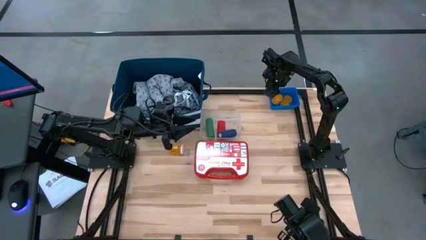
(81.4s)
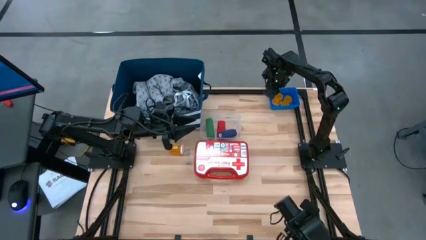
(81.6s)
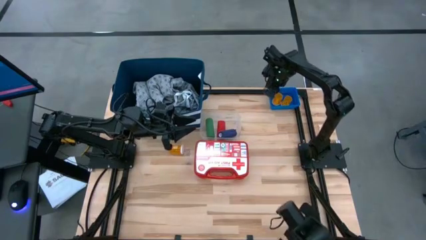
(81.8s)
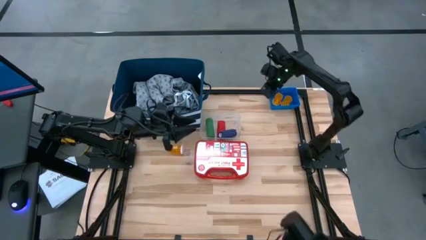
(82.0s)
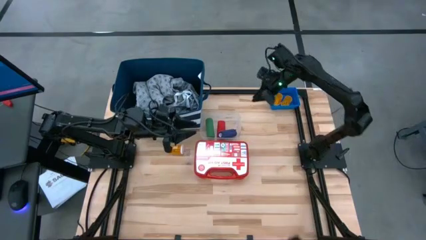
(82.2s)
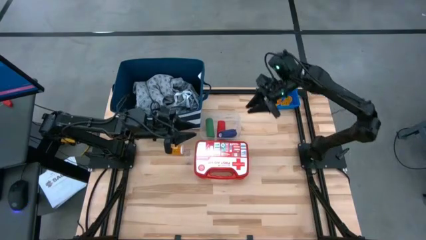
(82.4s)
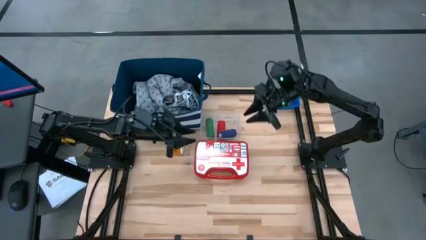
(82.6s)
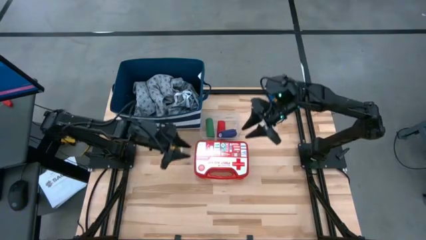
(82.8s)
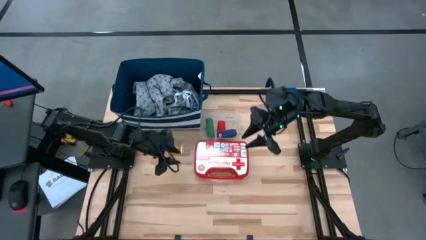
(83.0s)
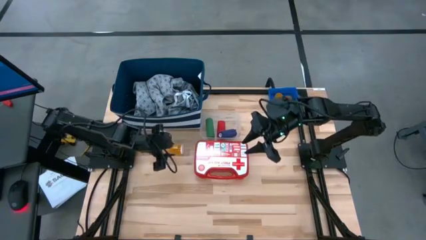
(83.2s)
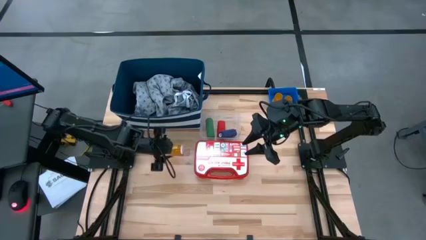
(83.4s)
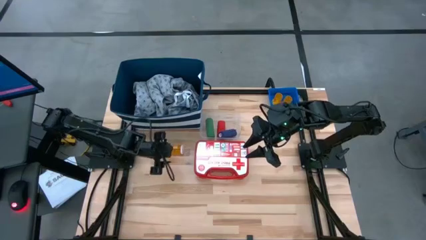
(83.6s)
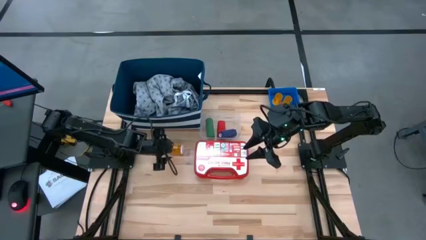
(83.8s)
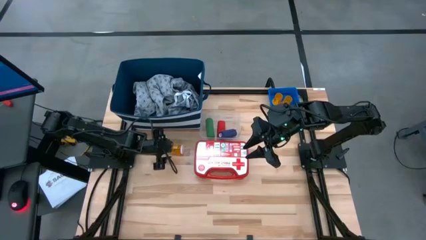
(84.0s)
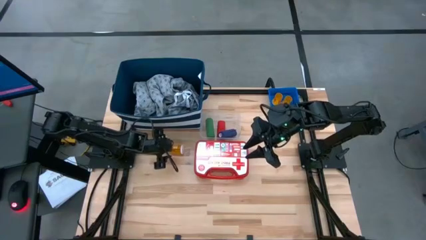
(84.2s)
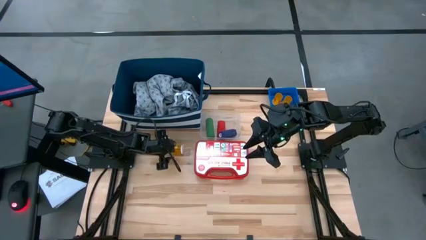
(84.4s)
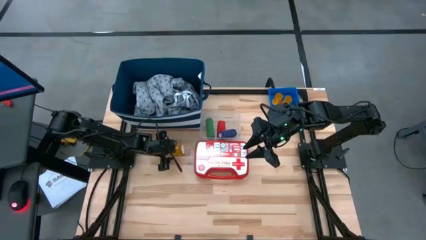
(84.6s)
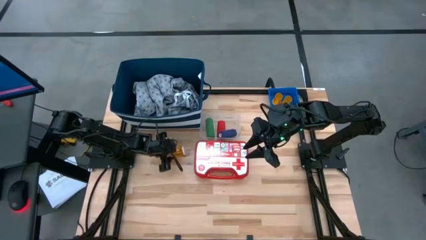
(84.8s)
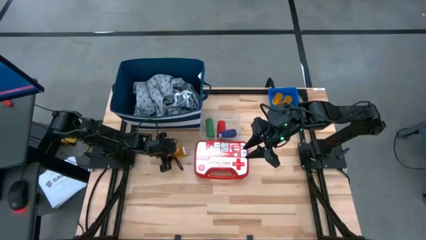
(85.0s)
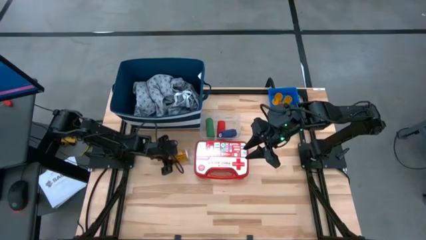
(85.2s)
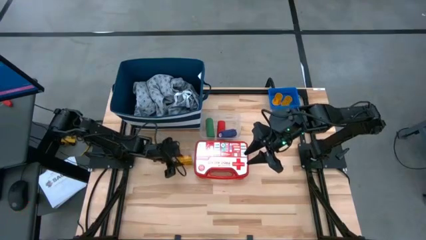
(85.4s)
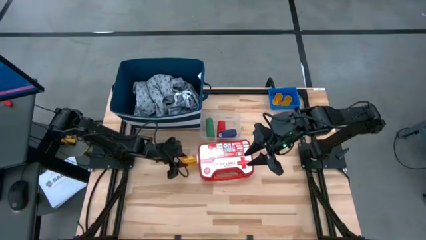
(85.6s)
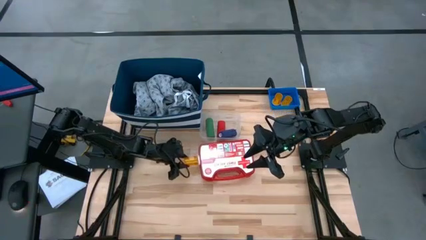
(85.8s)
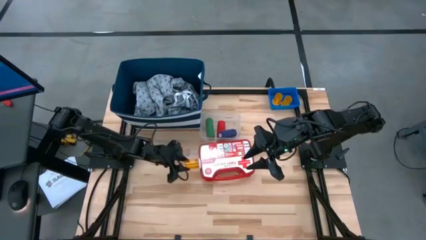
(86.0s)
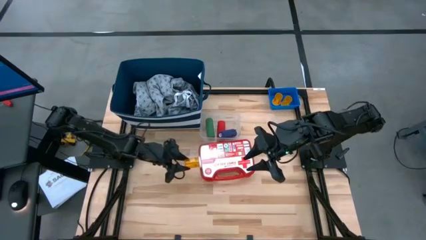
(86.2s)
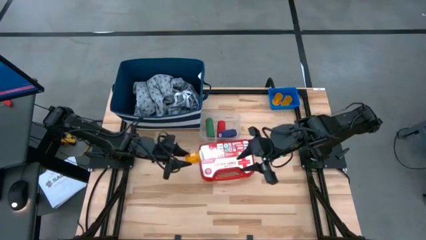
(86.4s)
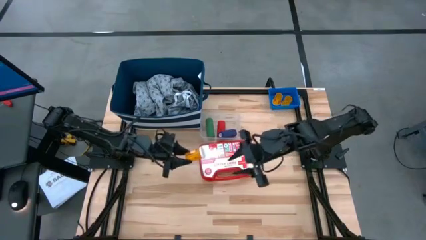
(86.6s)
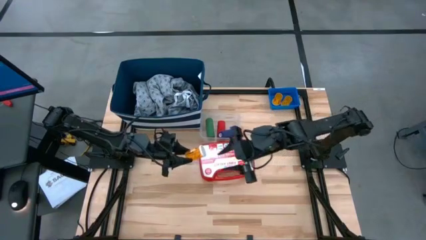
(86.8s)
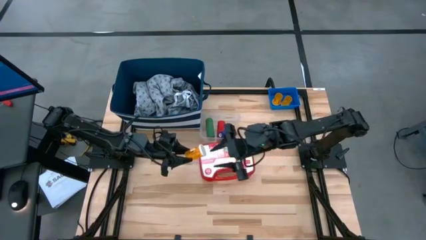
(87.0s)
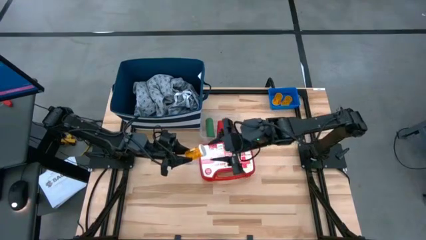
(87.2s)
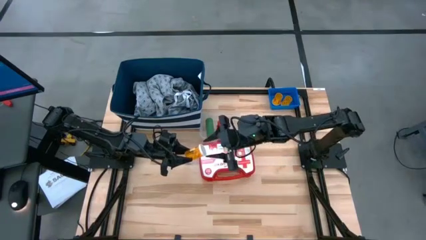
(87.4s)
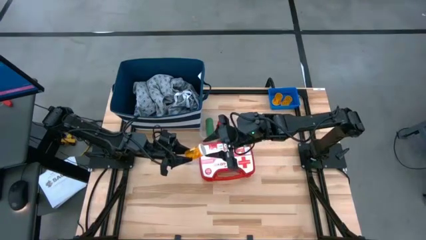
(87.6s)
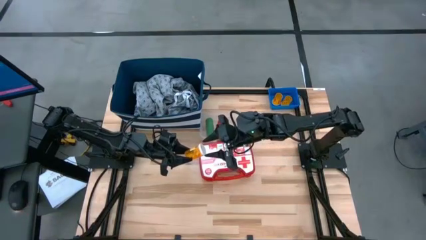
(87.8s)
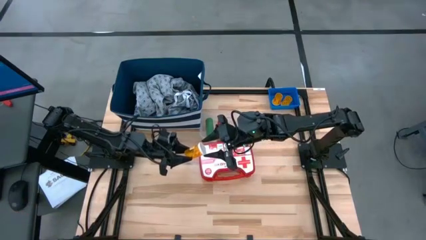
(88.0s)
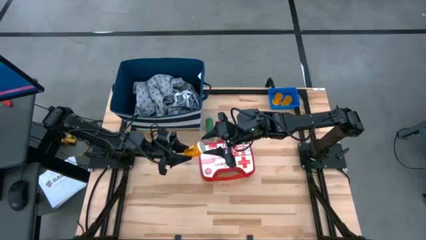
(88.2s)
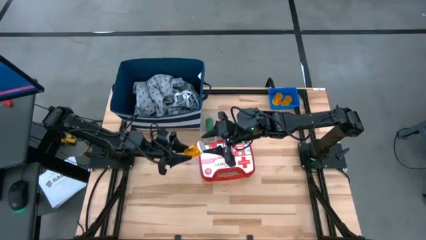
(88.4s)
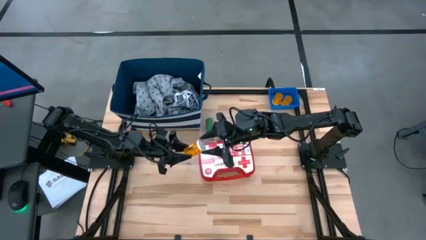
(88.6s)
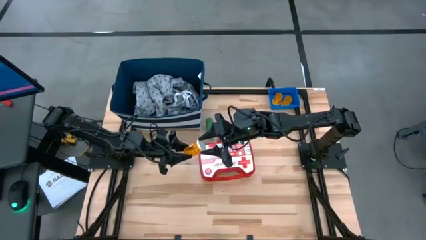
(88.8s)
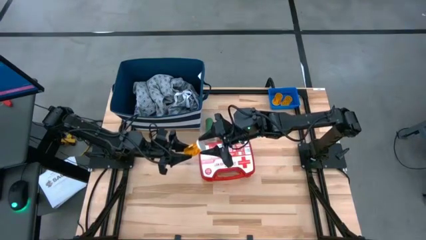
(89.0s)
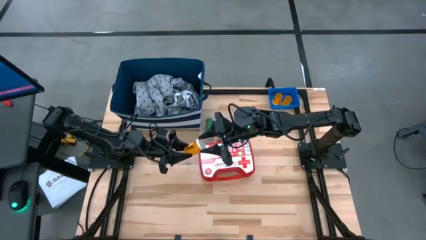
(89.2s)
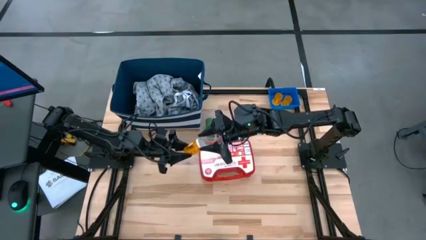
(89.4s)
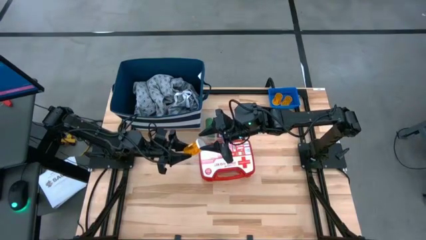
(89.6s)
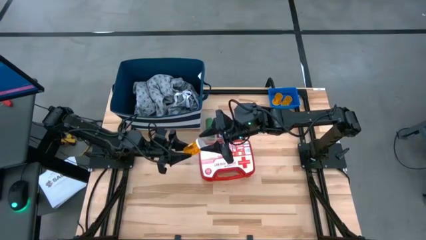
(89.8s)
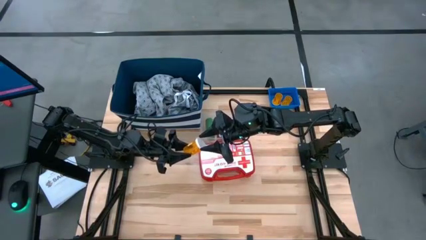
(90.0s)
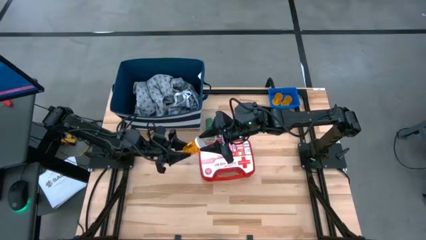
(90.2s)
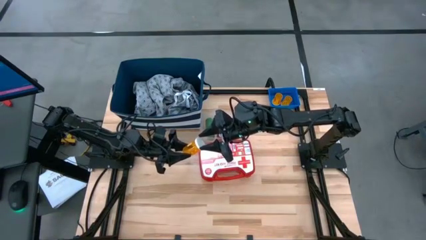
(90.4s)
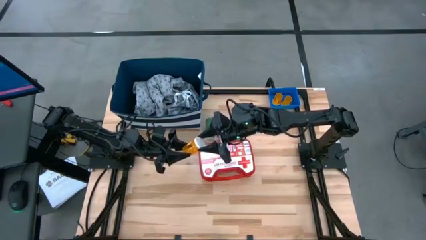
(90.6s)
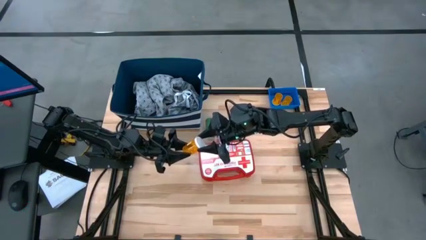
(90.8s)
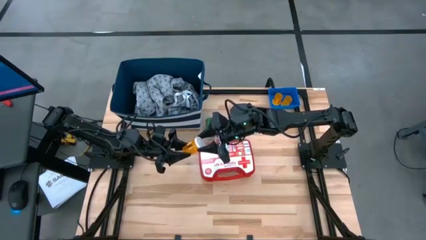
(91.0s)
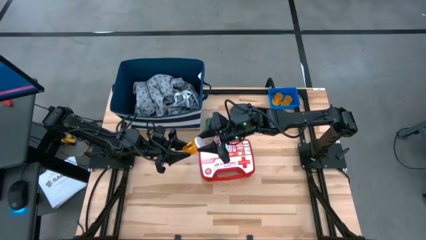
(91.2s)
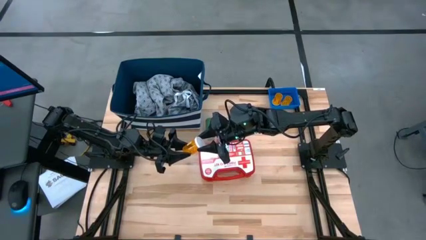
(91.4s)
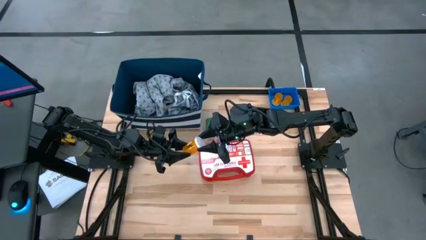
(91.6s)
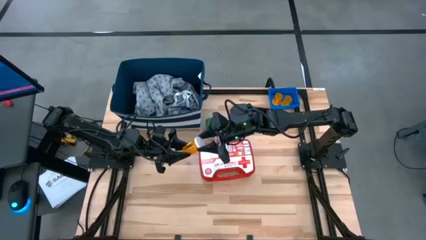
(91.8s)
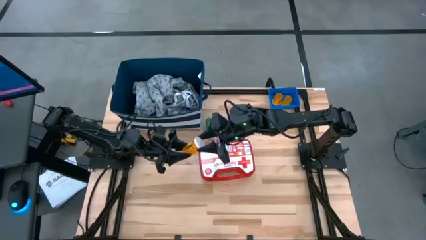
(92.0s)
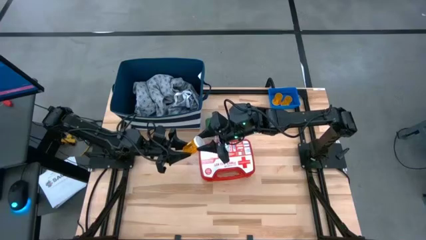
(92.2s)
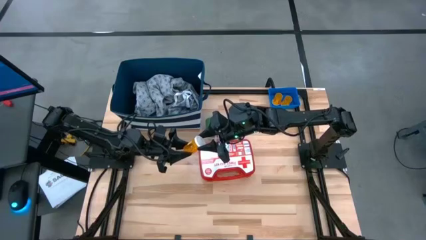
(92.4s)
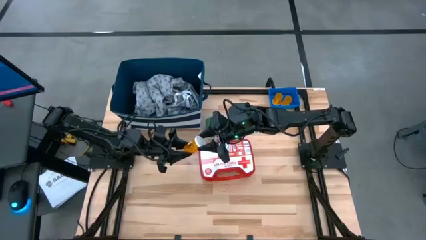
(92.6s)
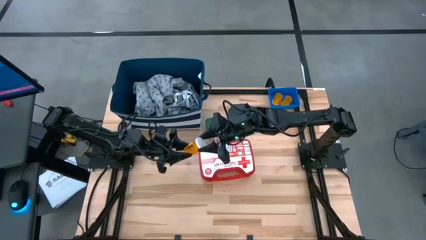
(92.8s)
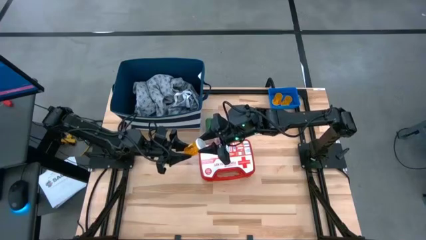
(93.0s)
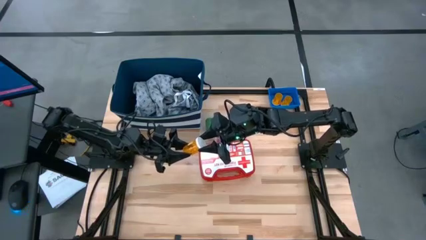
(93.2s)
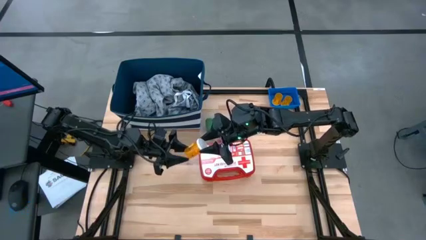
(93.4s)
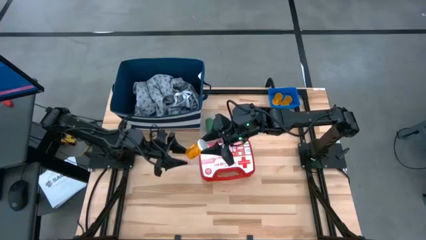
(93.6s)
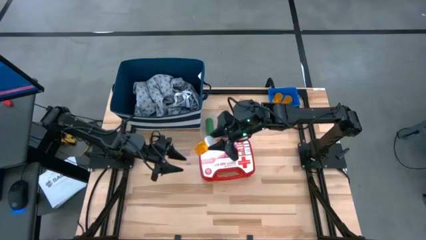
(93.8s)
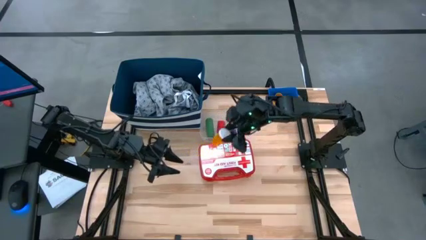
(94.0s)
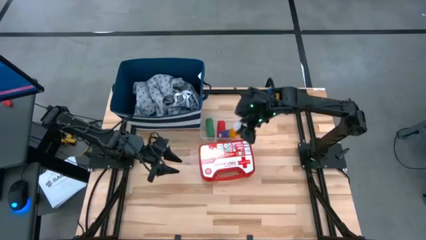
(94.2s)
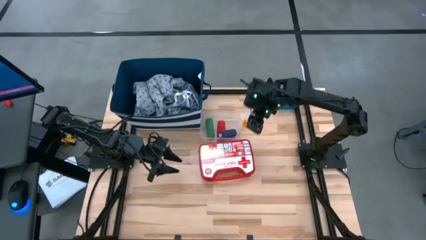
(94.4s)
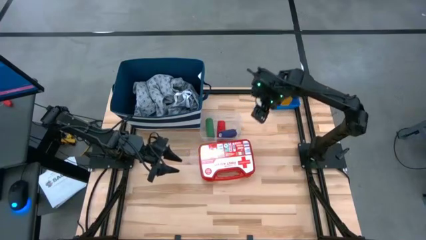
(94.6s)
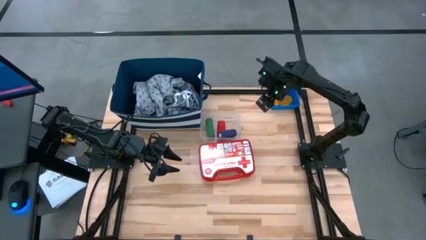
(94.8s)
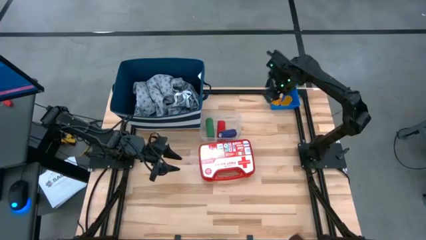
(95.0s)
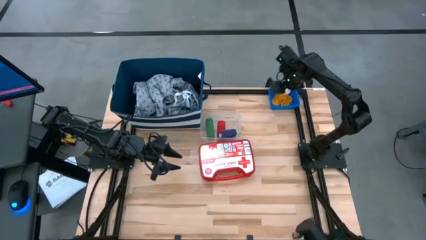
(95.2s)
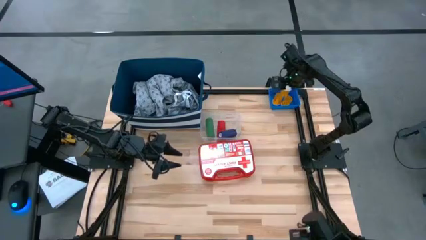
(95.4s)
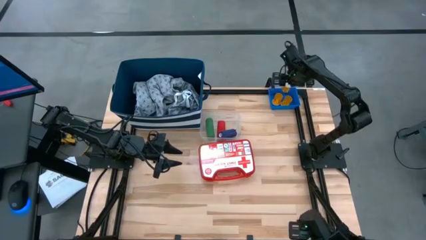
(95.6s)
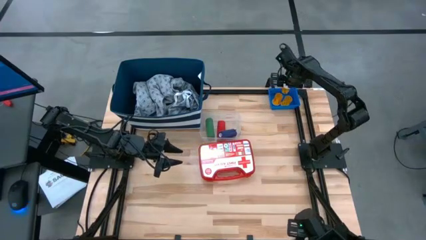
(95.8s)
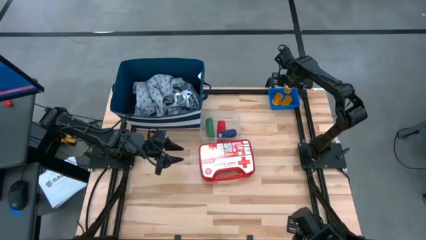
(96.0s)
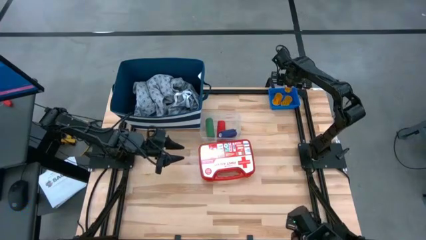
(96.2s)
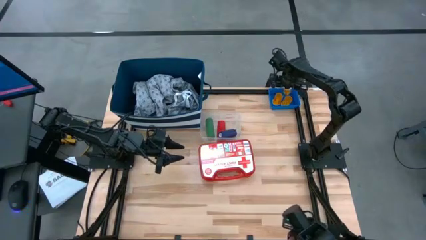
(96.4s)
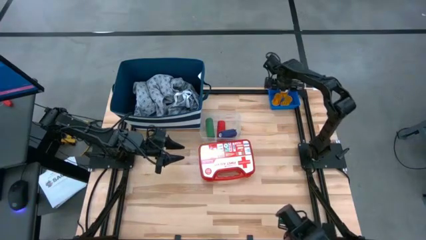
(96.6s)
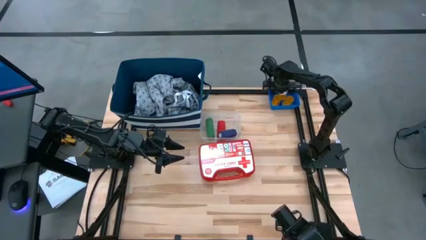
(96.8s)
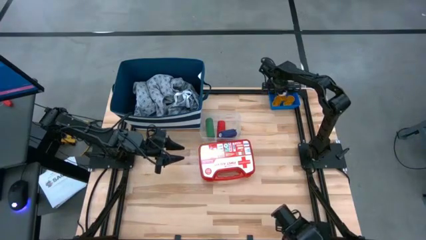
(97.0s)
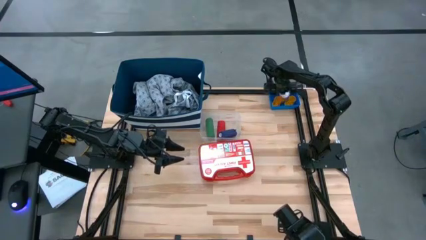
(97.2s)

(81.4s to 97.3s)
Task: Pick & place medical supplies in basket/bin
Put the orange pill bottle into the blue bin

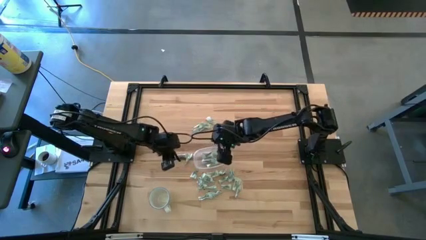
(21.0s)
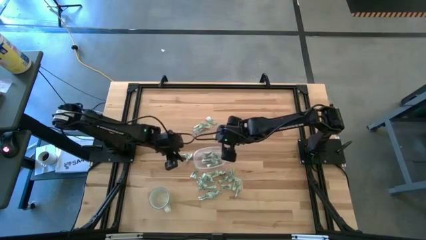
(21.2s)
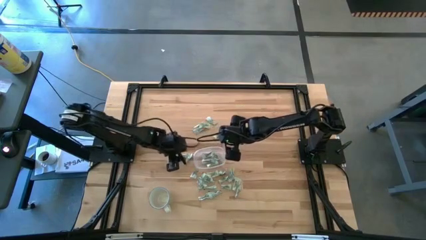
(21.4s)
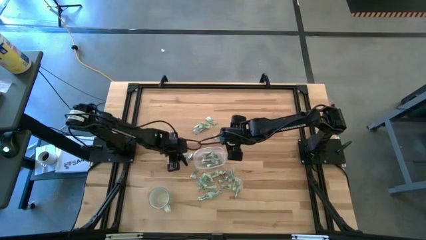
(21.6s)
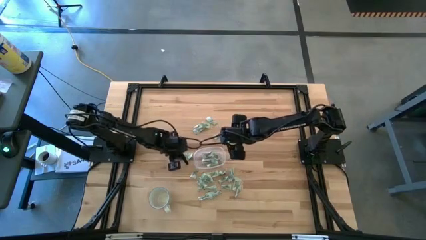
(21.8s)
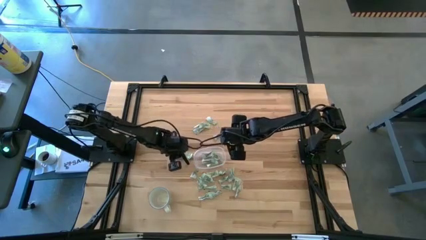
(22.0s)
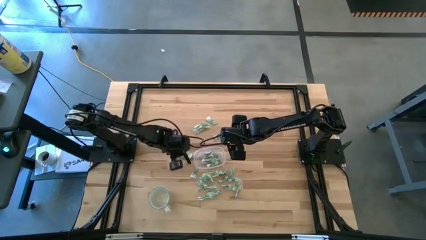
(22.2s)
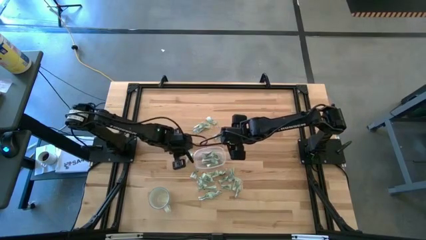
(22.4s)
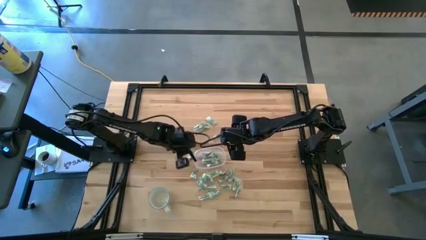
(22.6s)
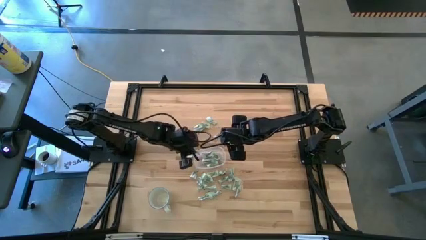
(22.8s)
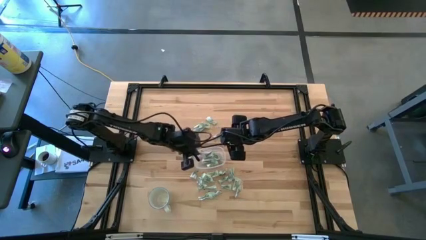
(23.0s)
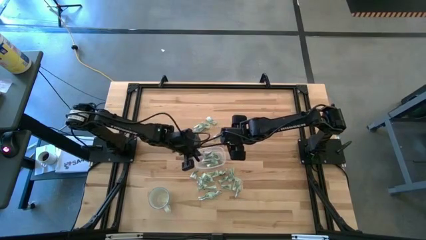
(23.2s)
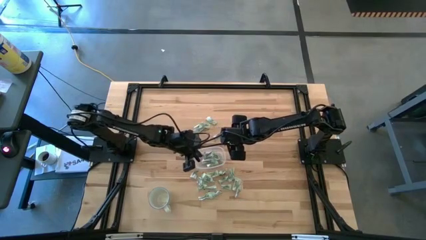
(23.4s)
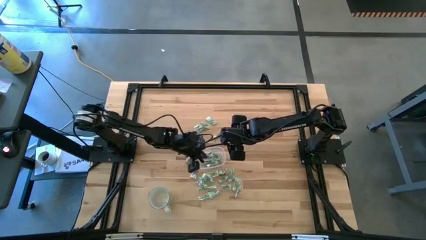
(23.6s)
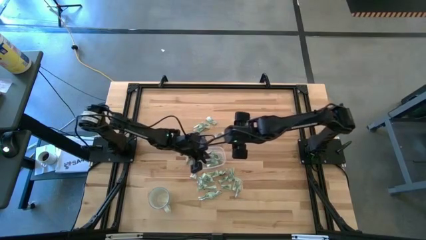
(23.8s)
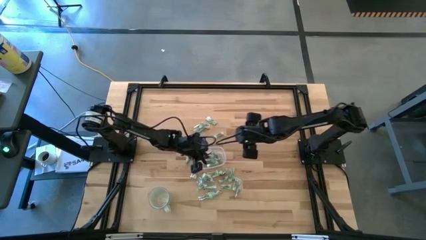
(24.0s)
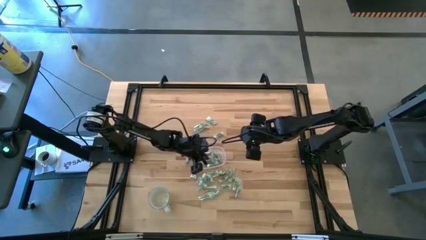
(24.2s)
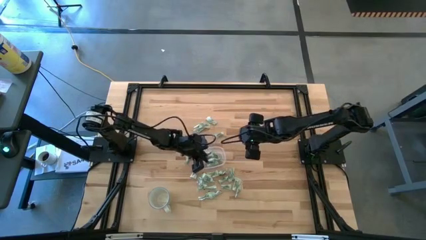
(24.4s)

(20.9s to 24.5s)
Task: Pick and place Stevia / Truvia into bins
Put the stevia packet into the transparent container
